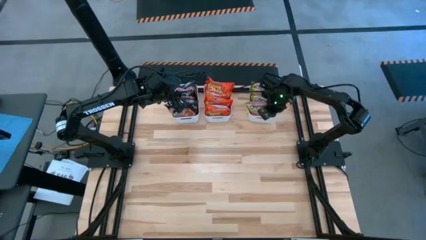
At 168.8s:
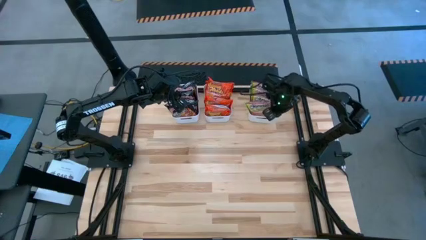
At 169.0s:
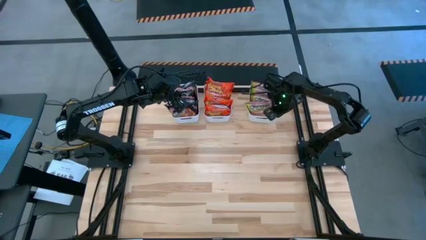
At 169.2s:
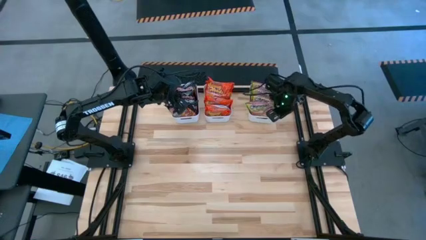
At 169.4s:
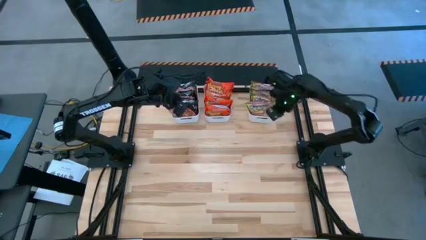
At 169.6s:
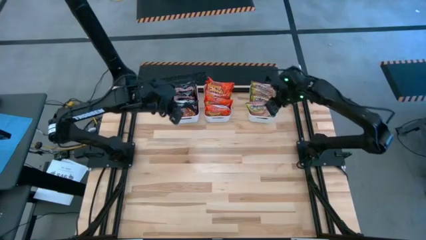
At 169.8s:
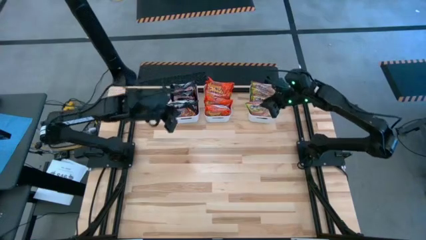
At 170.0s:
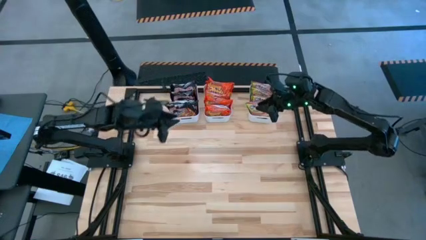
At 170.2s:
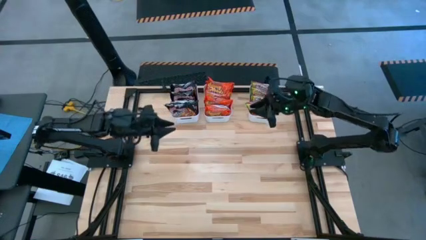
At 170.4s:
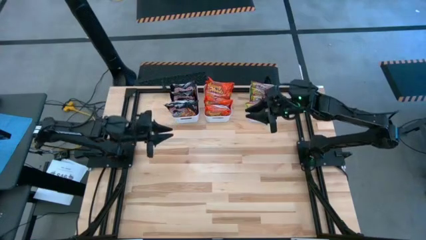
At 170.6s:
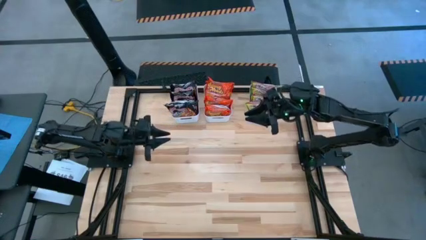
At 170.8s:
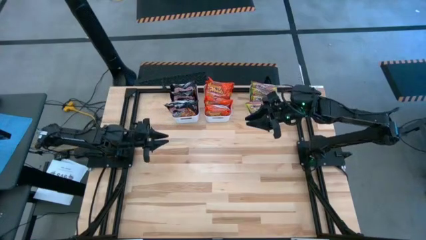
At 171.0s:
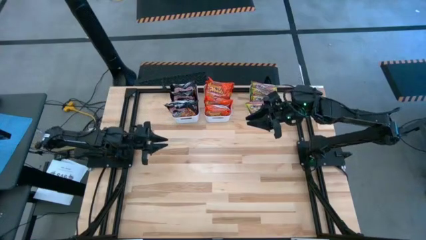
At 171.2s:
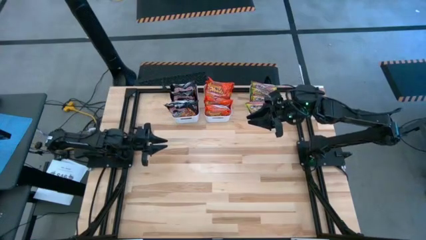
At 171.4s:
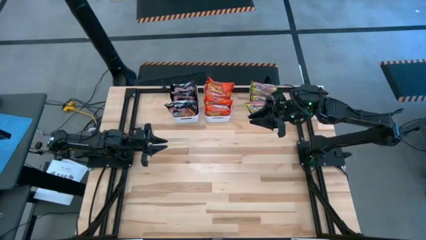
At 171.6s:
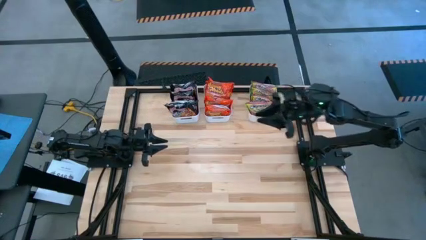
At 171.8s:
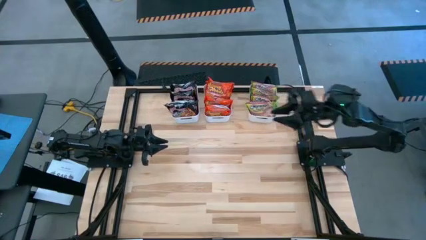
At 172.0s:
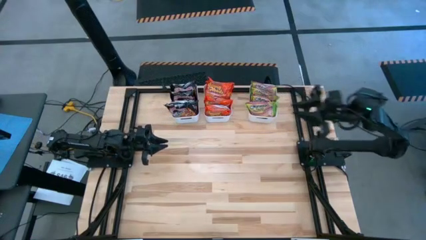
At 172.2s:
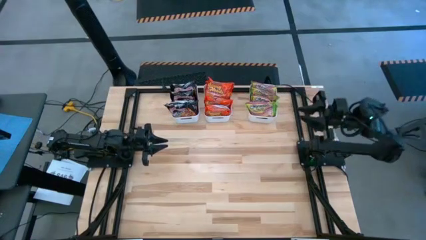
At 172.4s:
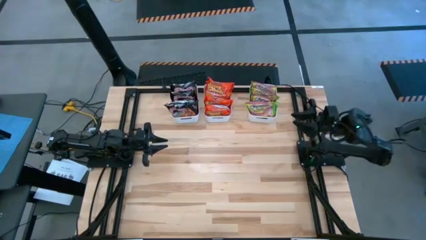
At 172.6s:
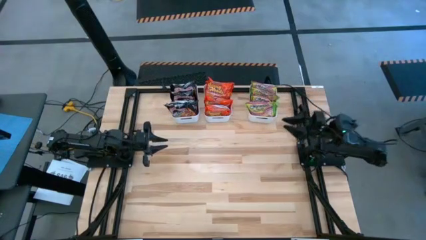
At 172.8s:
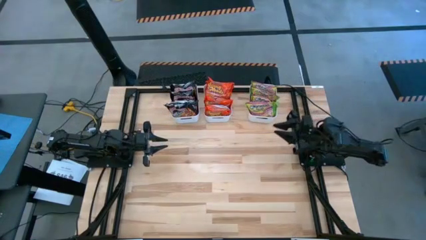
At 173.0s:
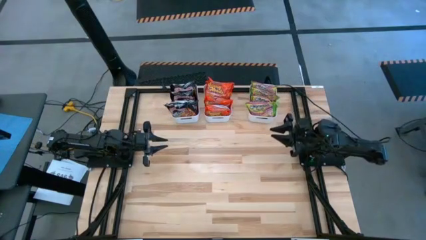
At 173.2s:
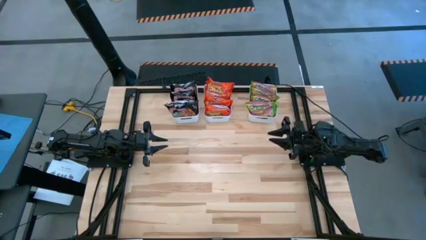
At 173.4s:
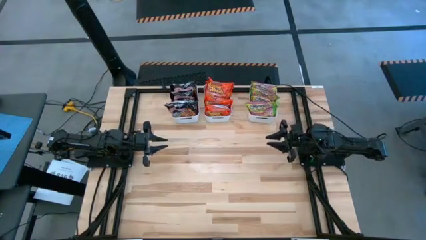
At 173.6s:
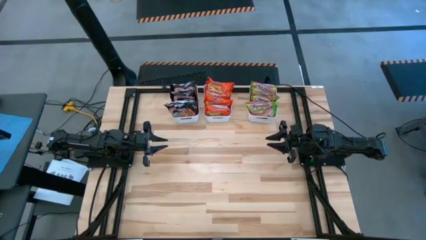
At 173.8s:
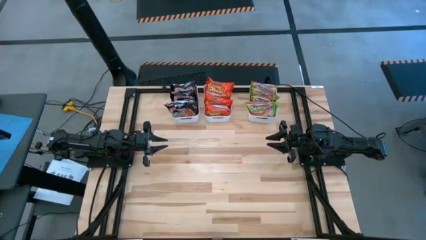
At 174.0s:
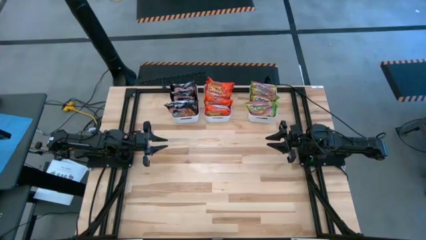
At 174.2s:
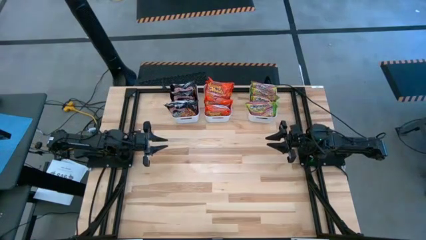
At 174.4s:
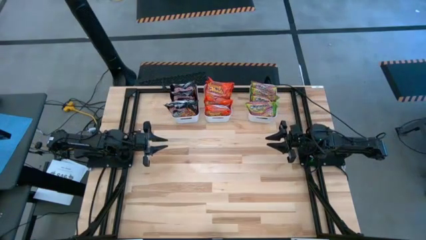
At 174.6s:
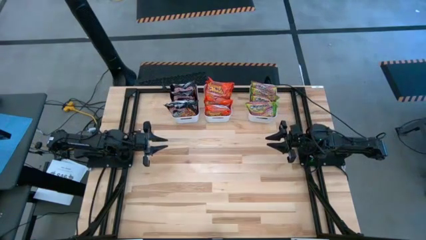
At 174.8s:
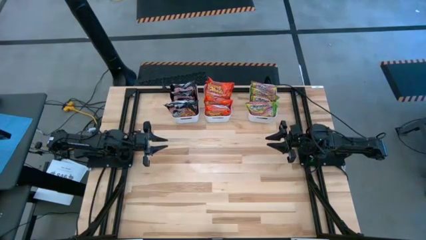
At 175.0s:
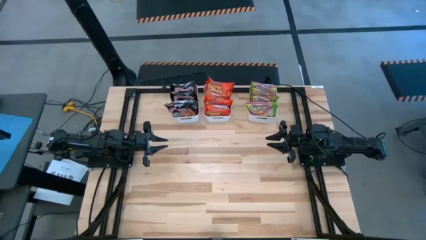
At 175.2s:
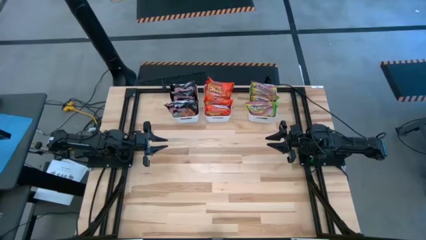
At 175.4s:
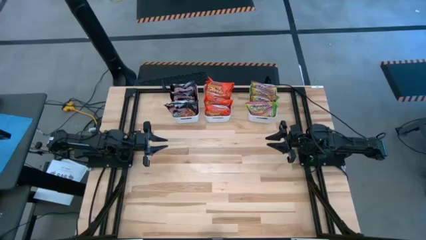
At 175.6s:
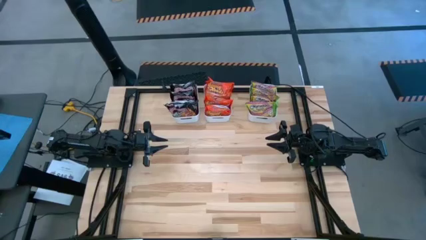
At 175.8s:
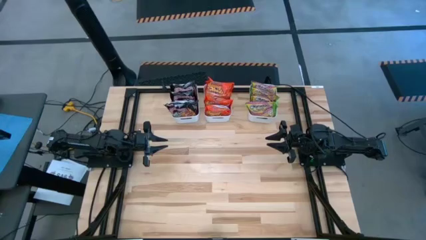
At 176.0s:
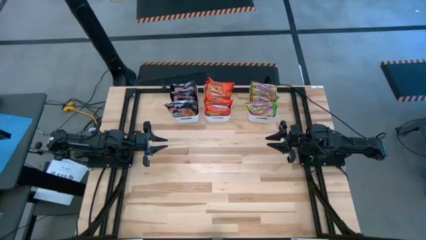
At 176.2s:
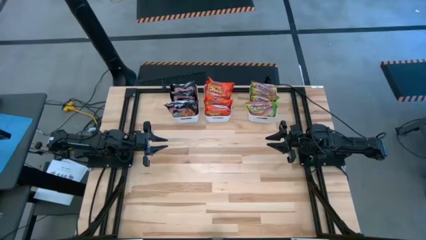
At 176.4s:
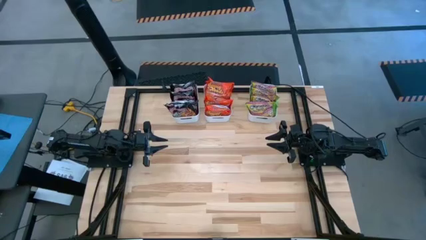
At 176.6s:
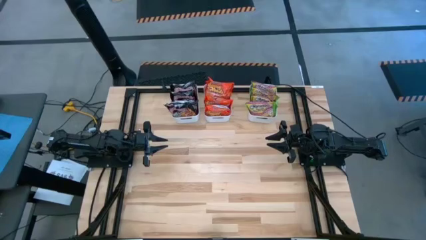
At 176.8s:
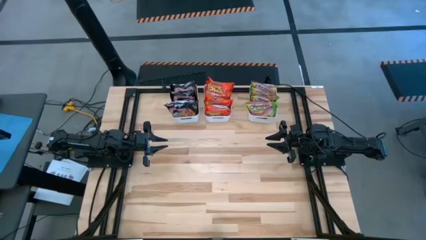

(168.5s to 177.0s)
Task: Sort Maruchan noodles
Return to Home Position

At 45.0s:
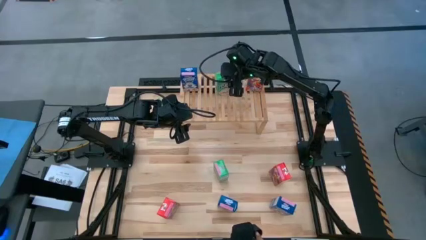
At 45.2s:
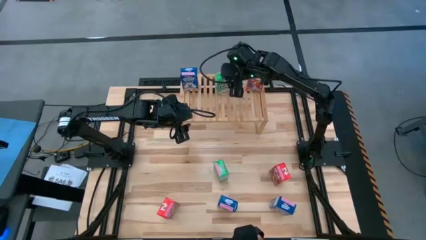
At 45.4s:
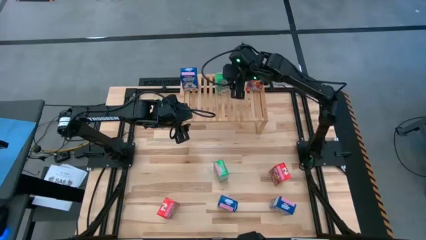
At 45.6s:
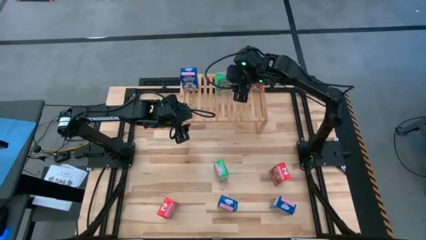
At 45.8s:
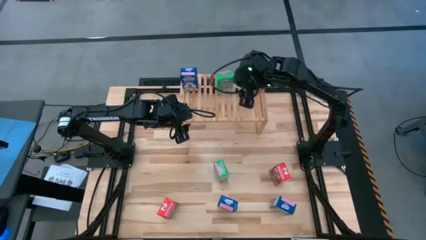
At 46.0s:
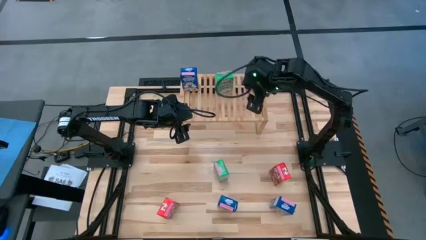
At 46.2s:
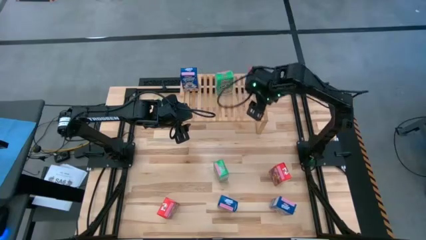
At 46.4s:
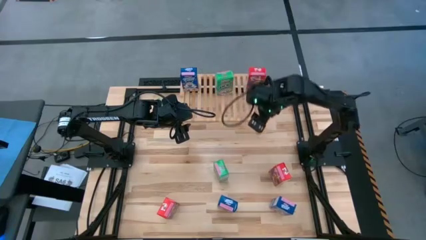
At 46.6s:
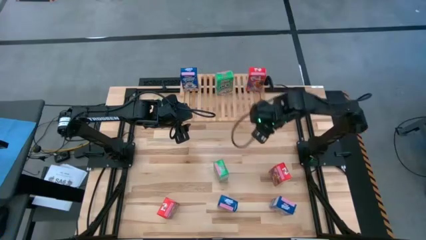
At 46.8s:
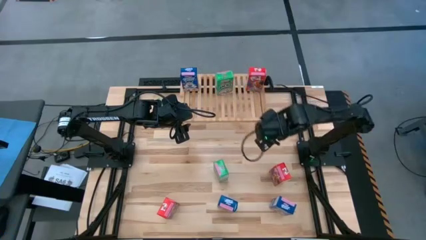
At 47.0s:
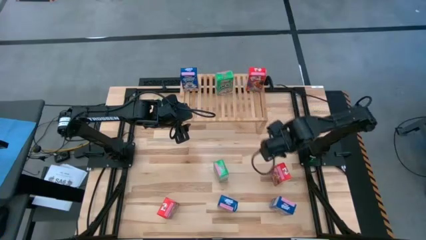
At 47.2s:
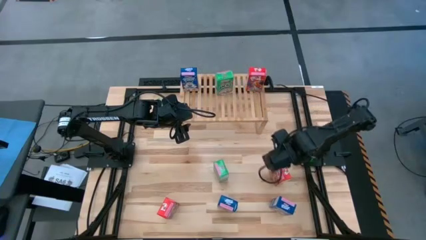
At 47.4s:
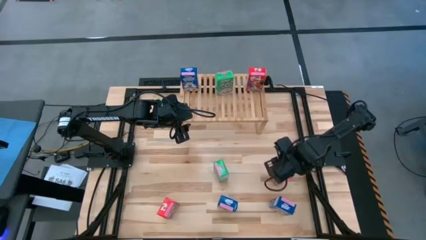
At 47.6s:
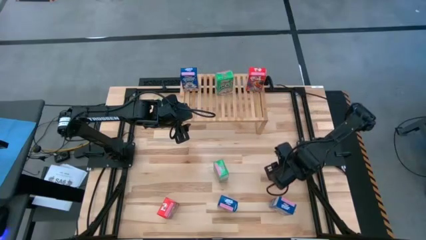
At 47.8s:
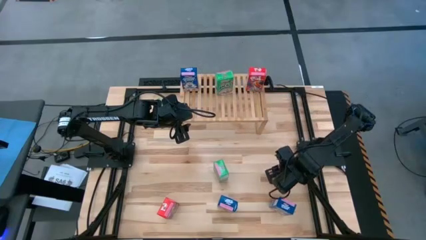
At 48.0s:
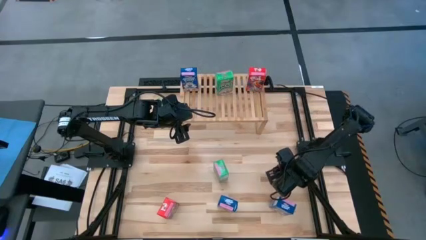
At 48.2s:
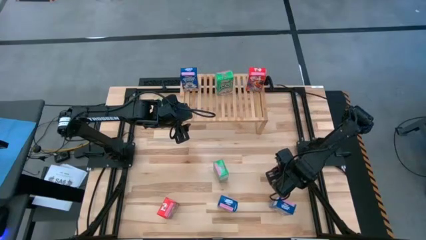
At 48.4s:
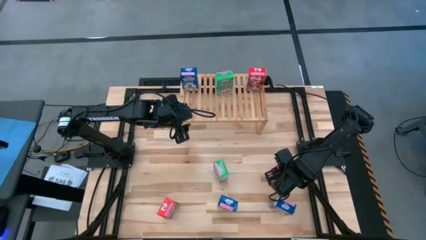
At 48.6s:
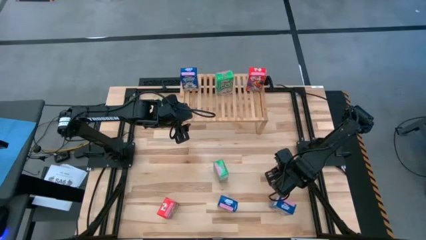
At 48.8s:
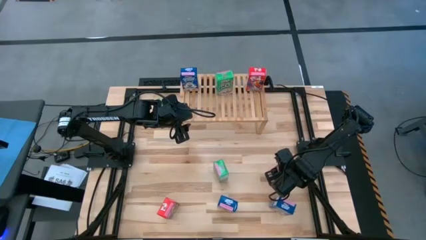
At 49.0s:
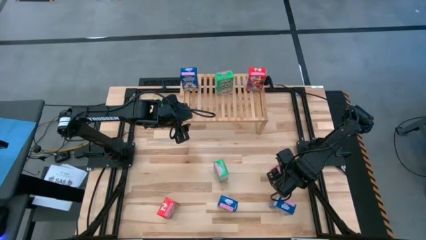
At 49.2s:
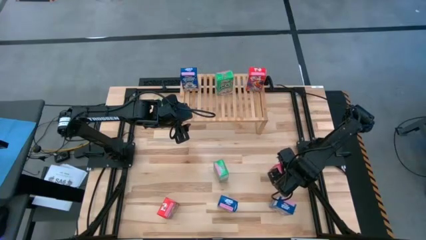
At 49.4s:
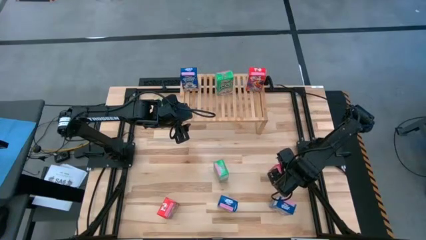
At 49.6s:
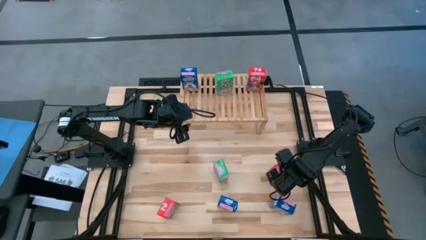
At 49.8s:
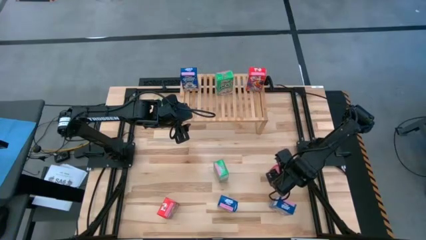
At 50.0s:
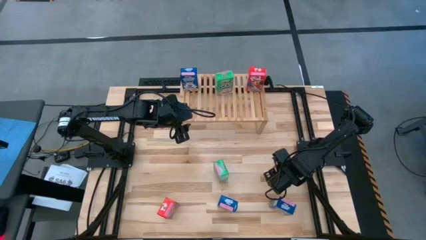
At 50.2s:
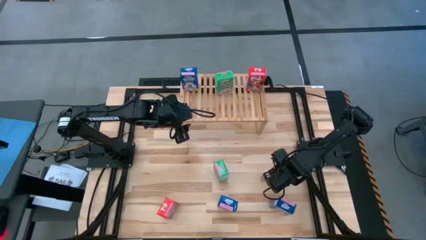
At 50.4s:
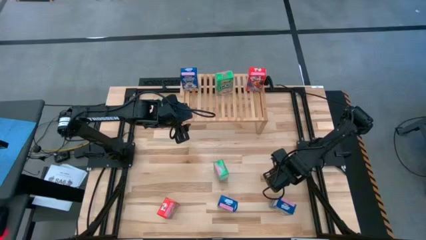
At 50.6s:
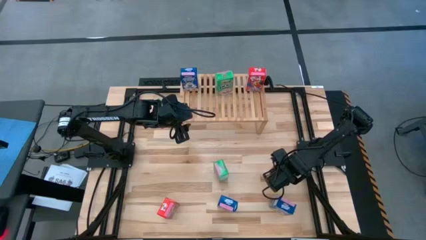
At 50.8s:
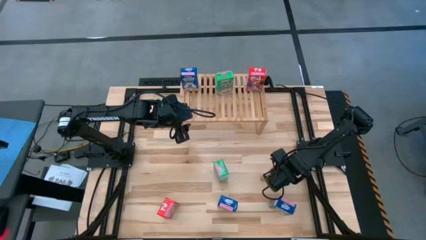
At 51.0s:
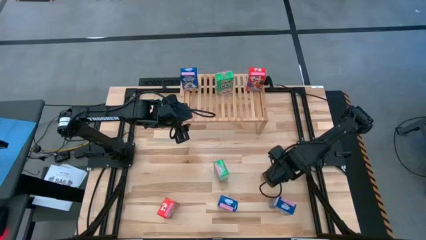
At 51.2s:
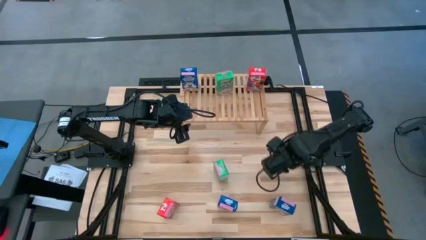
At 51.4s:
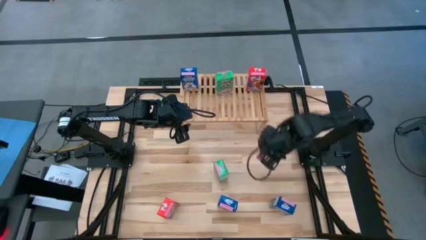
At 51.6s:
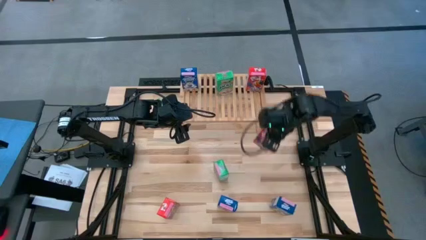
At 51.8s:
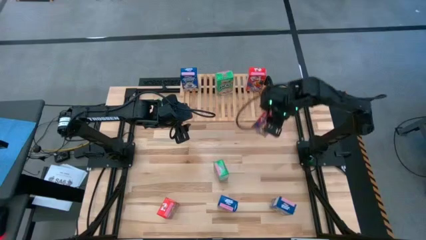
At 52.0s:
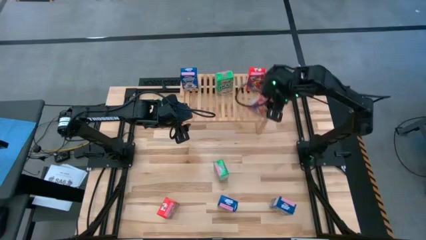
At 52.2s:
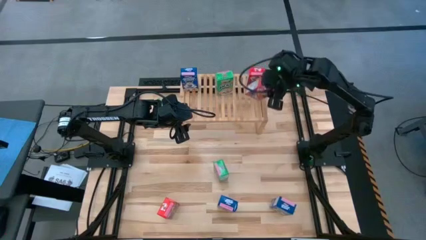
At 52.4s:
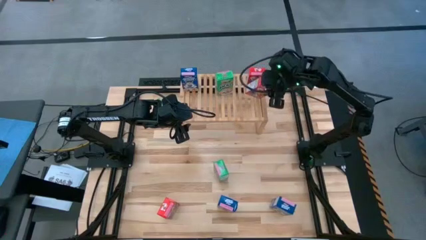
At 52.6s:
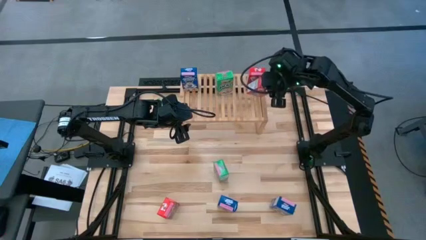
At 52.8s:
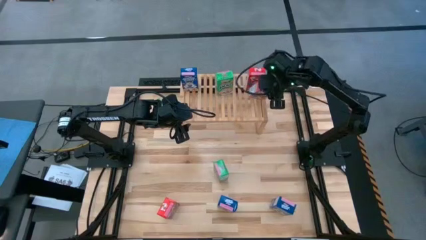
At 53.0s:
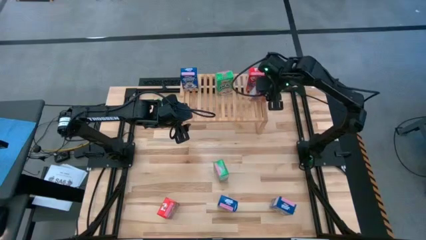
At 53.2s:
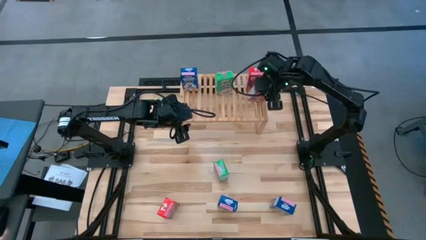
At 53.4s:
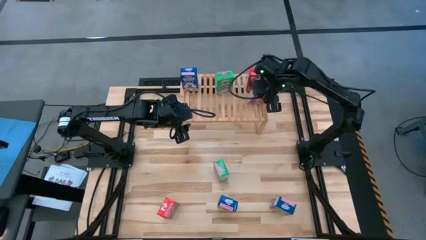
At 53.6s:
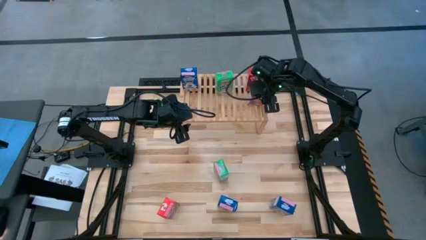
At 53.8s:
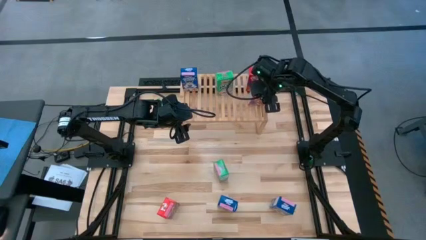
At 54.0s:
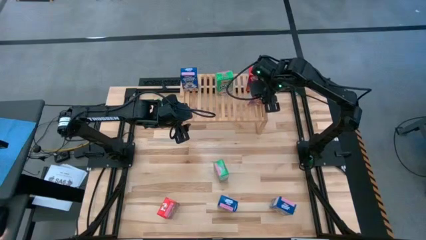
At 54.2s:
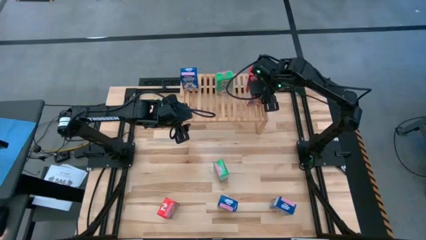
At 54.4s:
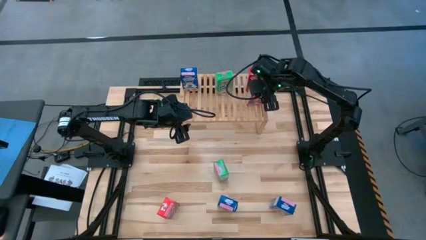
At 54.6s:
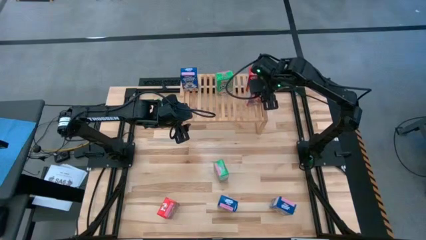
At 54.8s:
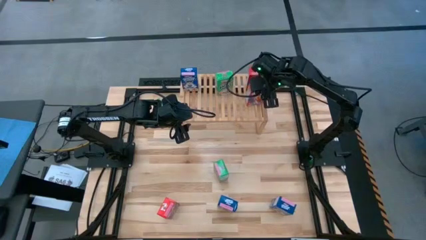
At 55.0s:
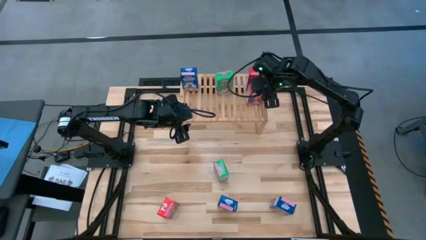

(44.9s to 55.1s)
Task: Stack cereal on shelf
Put the top red cereal box on the shelf aligned with the other red cereal box
